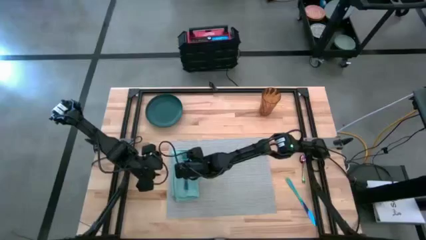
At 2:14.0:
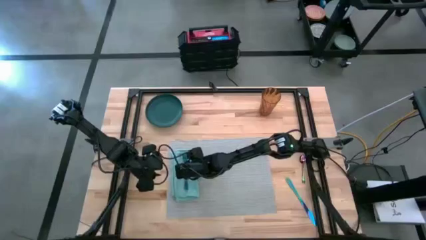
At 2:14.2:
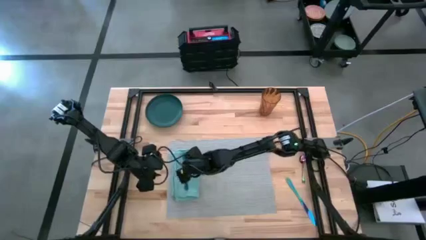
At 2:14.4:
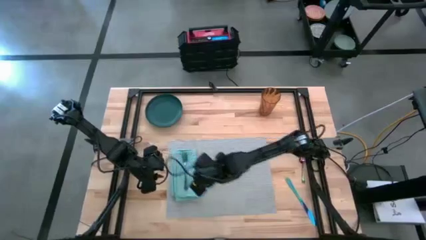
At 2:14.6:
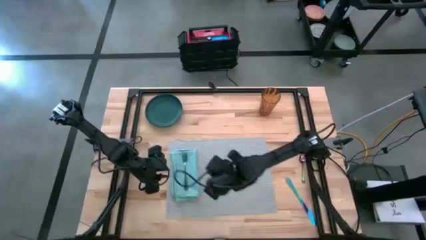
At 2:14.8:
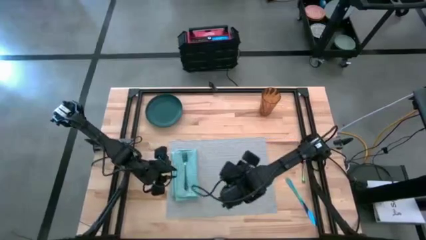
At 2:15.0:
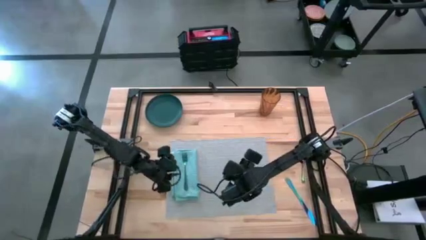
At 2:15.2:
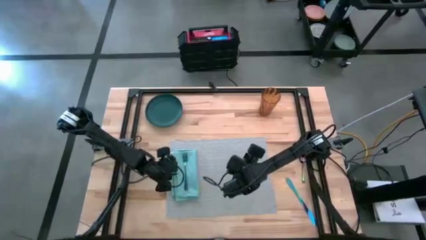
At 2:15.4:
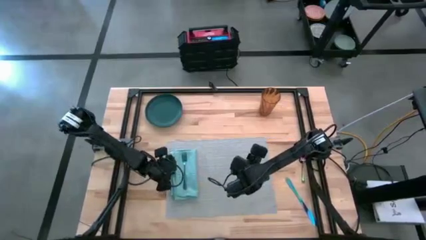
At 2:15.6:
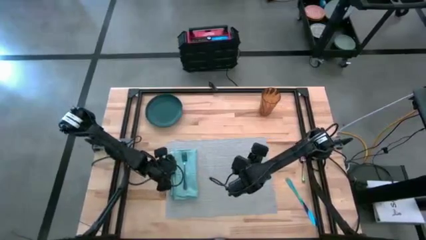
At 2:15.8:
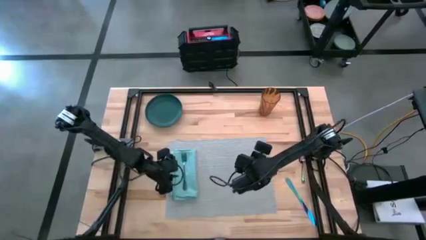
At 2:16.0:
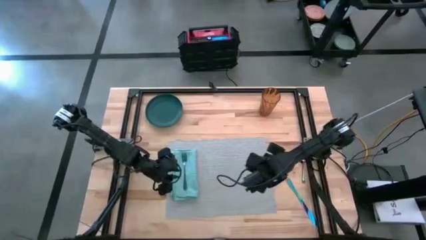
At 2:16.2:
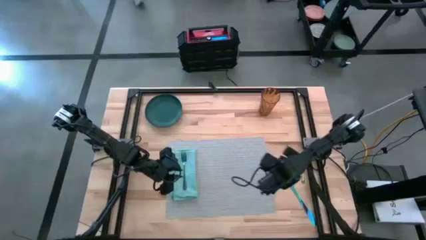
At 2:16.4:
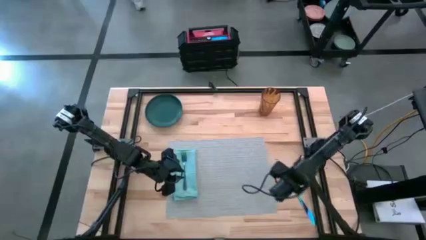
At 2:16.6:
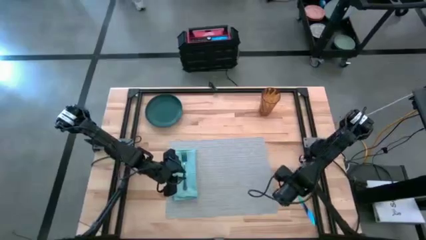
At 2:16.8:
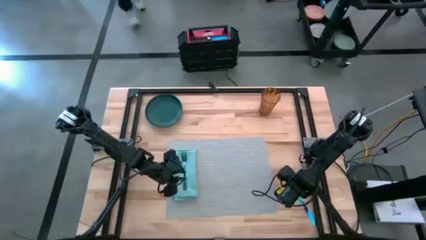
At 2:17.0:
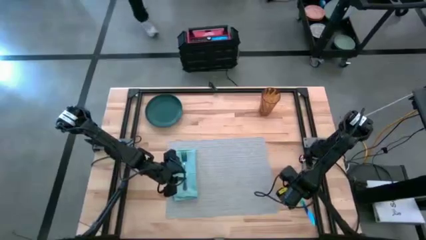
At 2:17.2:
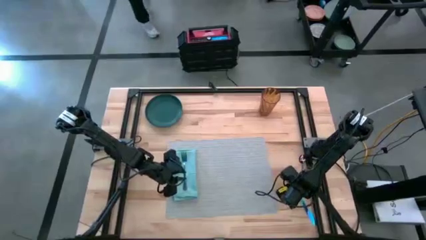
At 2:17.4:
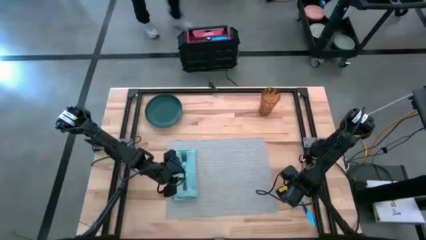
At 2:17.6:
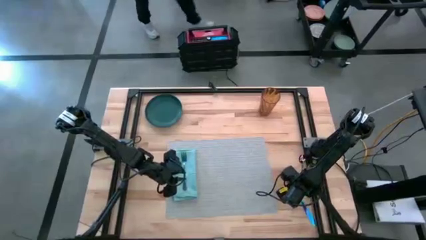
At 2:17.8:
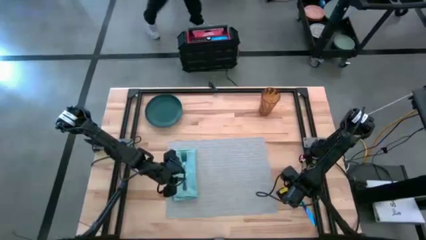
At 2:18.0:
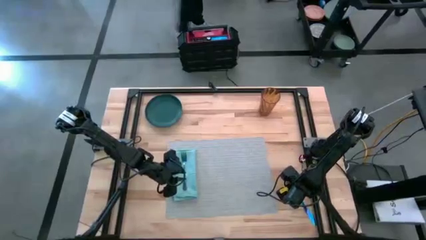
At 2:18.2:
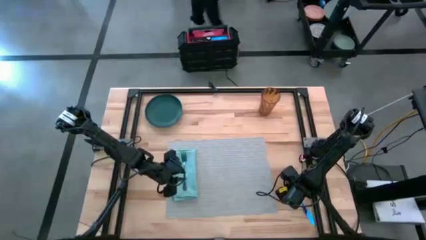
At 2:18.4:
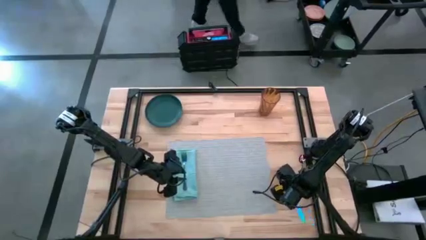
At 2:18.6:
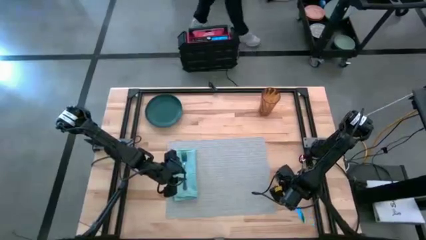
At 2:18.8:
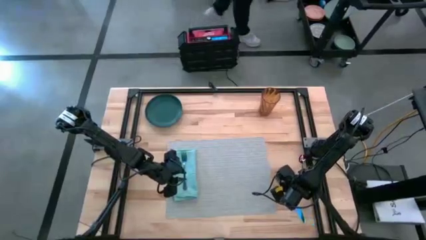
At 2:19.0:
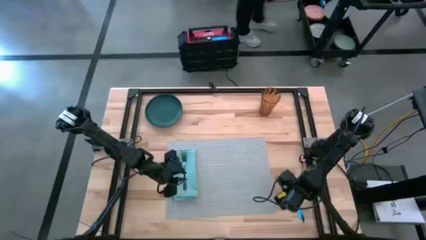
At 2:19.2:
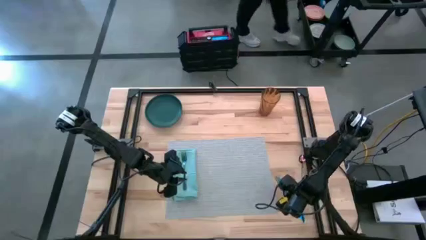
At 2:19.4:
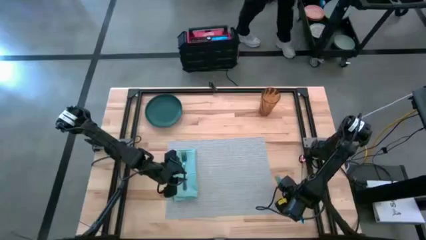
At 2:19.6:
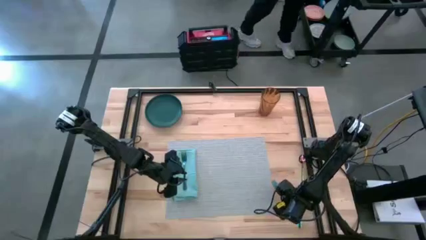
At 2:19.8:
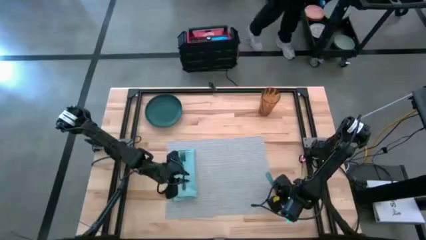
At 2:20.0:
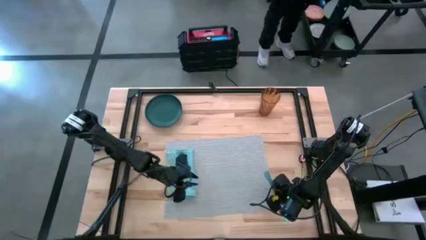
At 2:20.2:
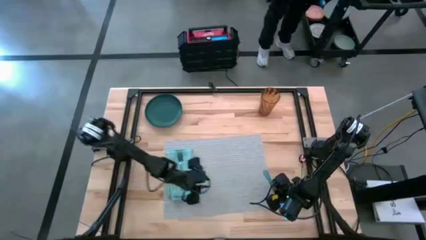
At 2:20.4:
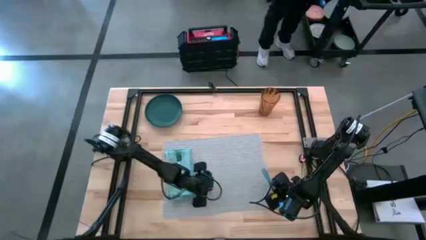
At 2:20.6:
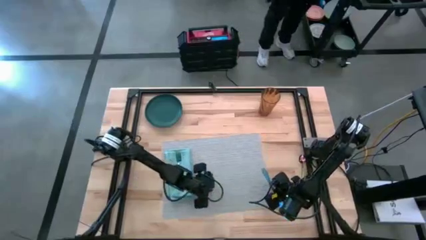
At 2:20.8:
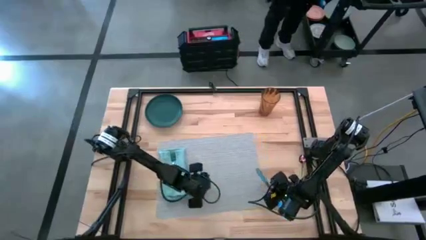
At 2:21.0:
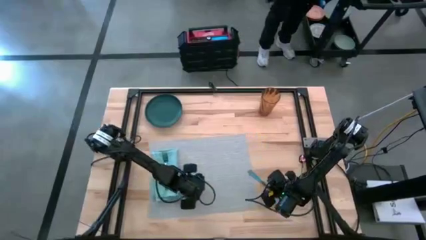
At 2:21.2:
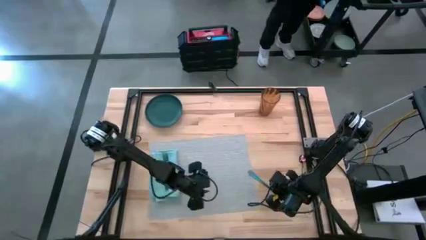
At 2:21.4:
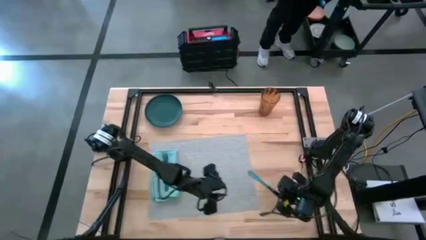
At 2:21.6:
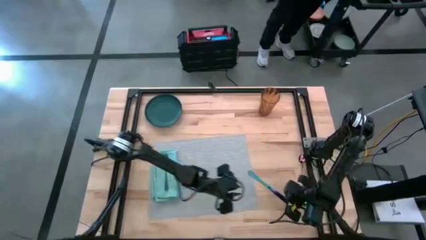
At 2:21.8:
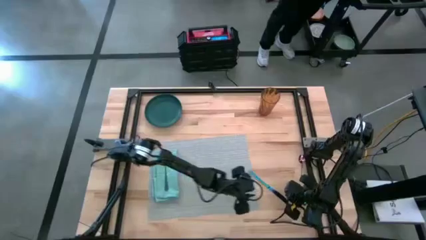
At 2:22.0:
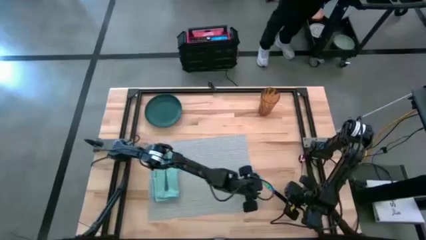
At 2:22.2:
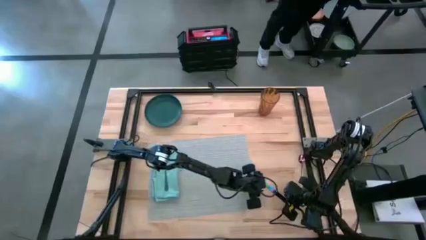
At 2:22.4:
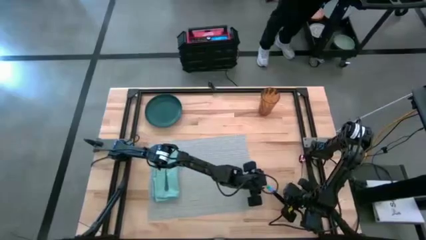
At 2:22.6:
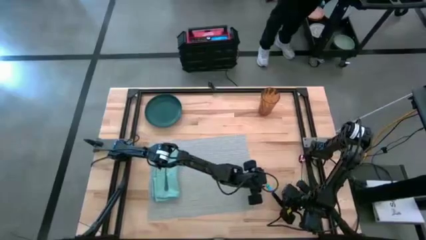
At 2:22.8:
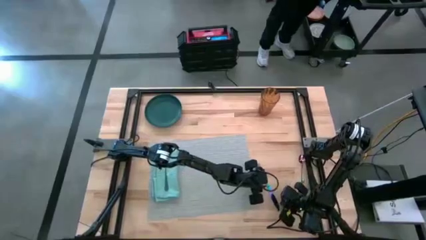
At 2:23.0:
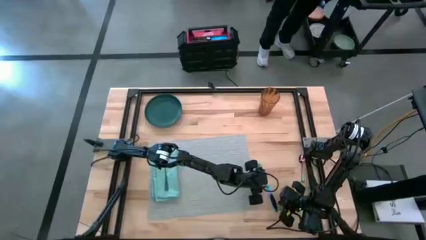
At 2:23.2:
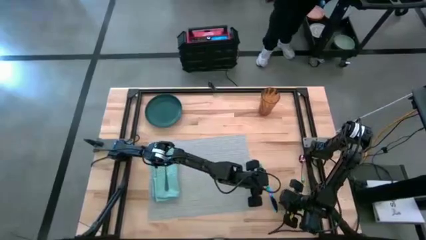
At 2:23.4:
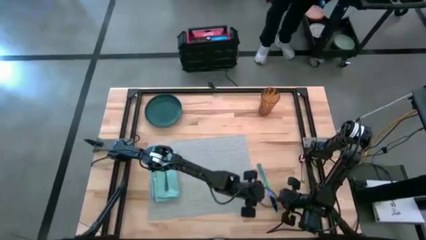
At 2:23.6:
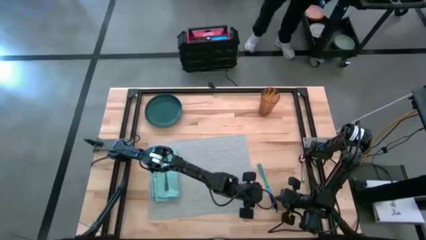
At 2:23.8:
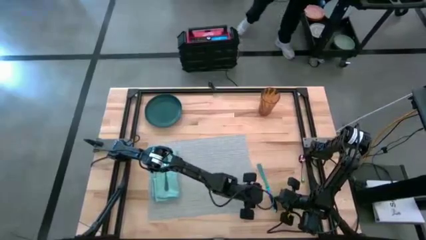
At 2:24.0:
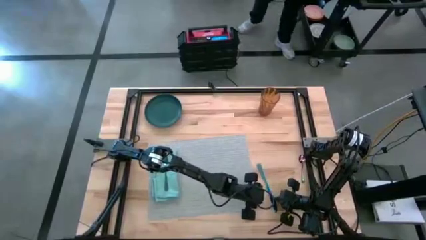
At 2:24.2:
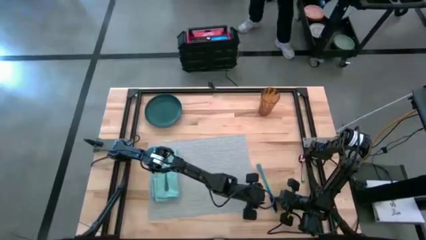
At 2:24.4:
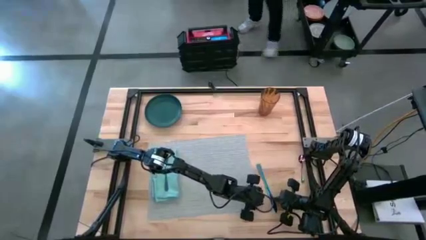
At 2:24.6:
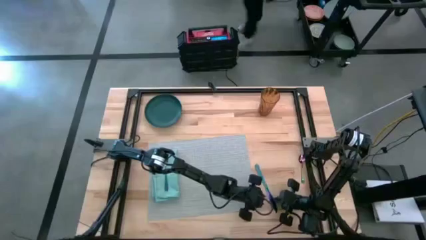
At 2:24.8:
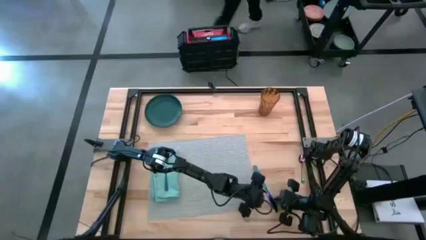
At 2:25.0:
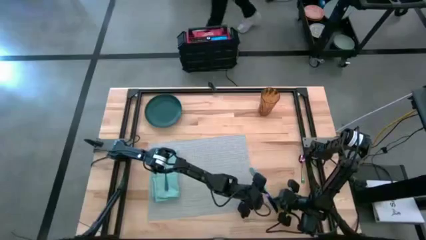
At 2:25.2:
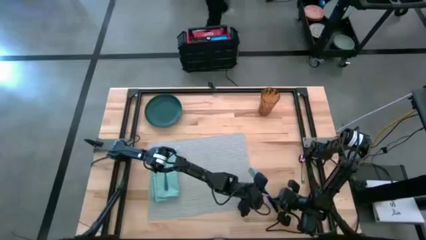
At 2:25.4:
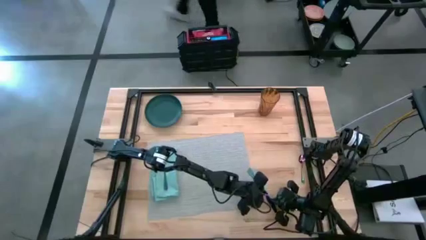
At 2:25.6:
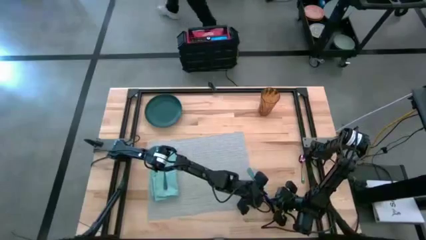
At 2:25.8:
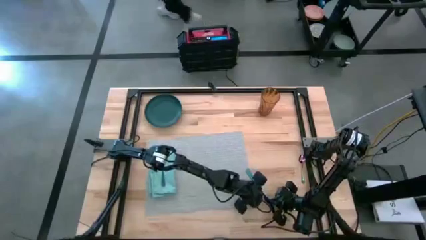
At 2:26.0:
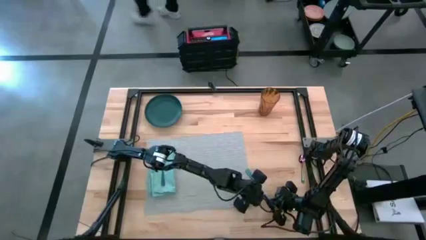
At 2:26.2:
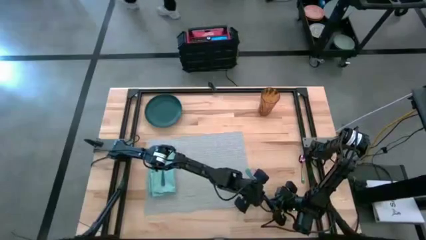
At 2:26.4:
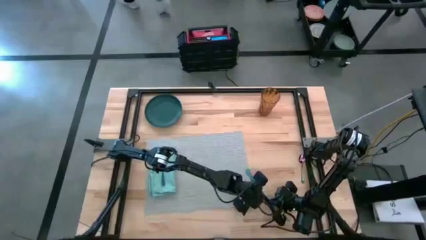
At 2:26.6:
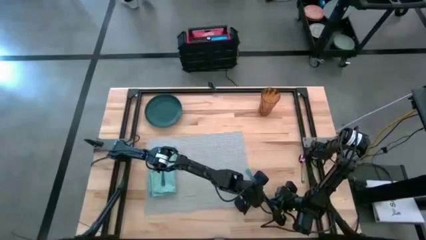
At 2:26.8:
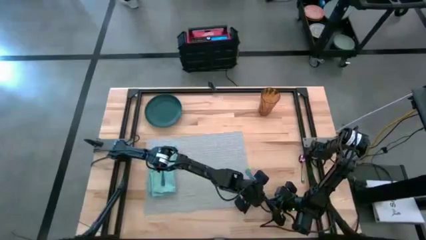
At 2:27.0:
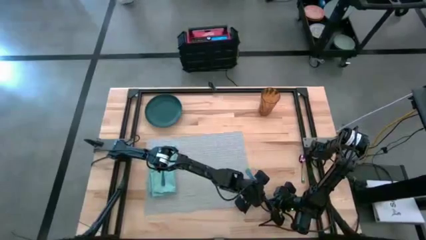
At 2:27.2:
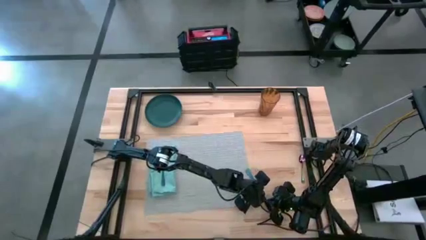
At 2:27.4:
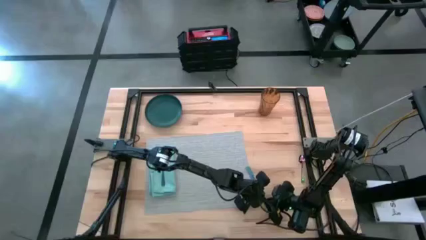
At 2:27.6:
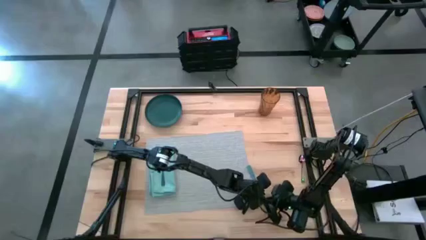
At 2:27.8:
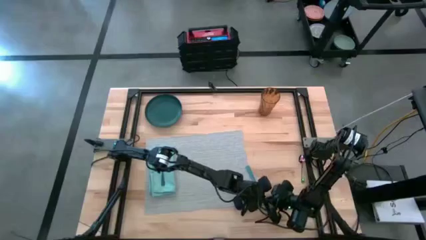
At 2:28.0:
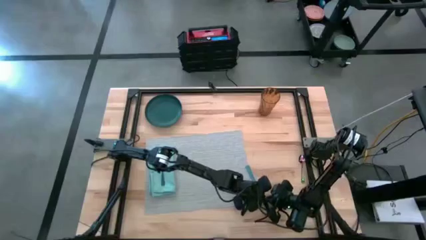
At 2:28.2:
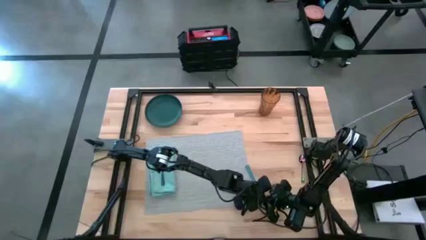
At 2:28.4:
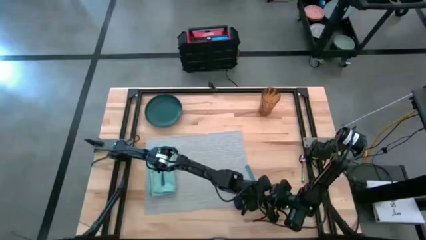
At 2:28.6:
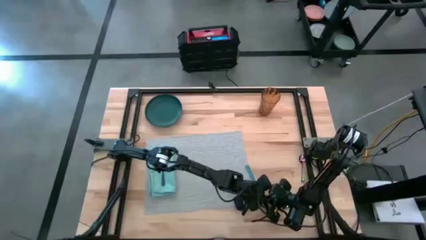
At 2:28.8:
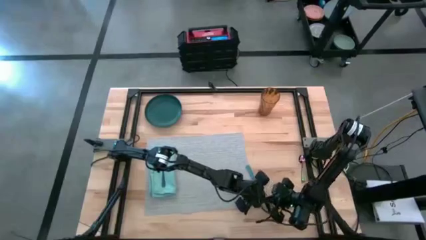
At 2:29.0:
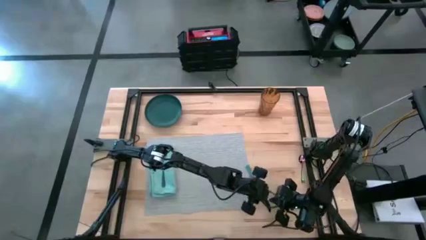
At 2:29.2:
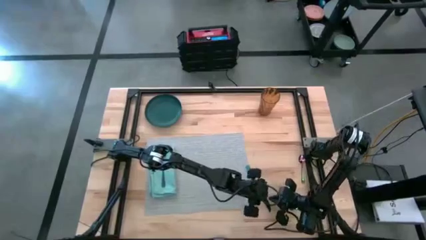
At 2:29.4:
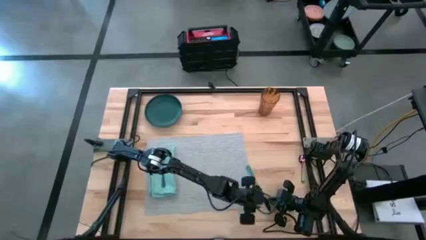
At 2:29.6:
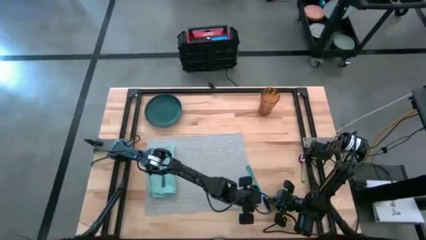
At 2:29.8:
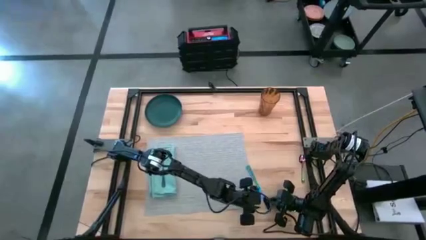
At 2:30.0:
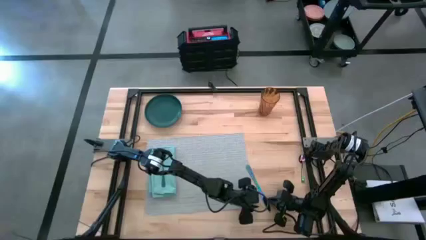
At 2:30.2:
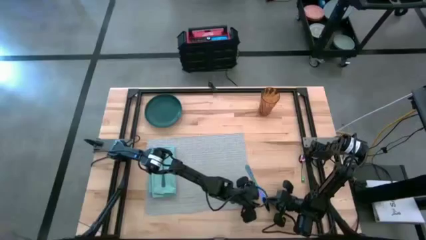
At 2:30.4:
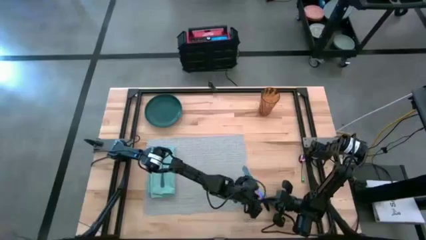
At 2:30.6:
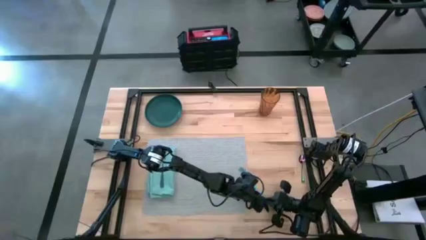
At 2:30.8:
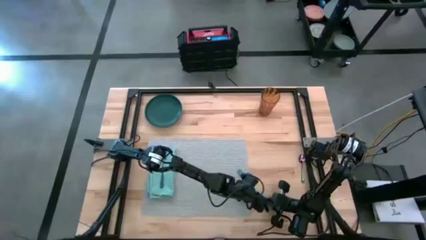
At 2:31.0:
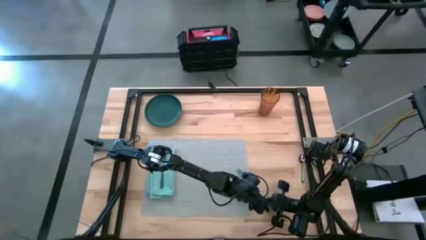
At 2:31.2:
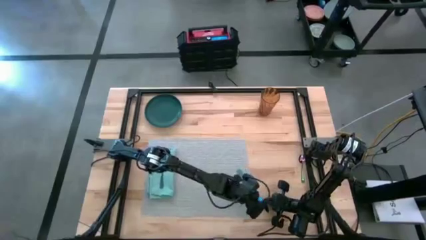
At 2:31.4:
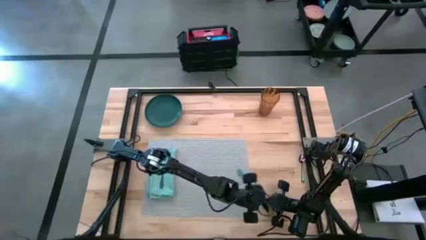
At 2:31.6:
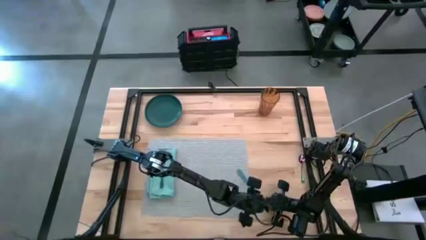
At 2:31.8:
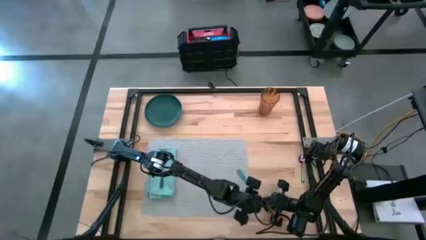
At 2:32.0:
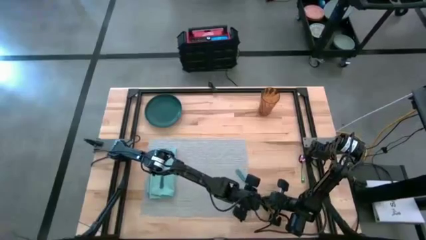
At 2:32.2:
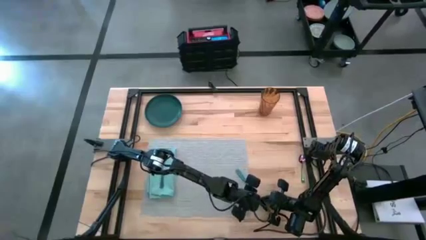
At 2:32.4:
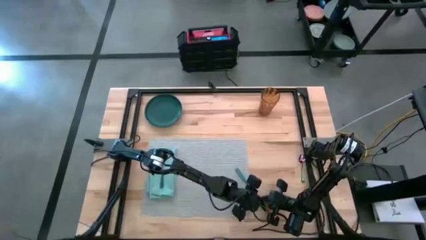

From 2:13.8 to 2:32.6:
Task: Set table place
Put the blue table knife on the right of the gray tablemat
